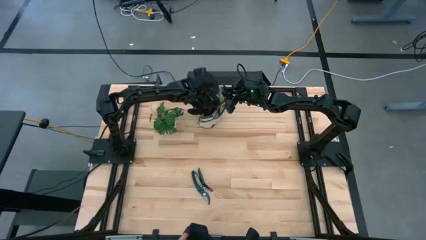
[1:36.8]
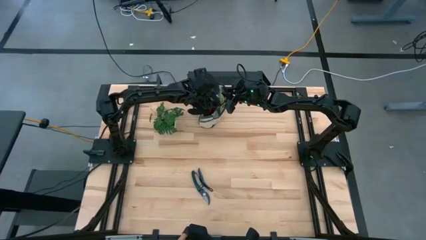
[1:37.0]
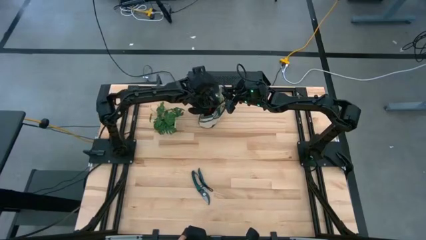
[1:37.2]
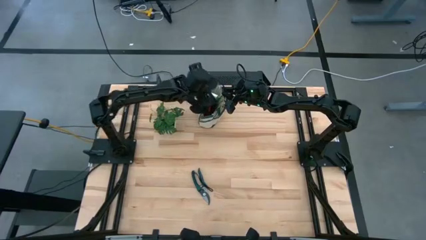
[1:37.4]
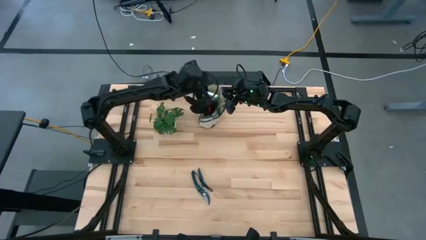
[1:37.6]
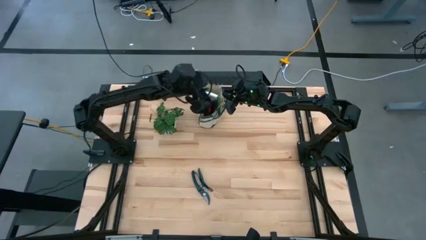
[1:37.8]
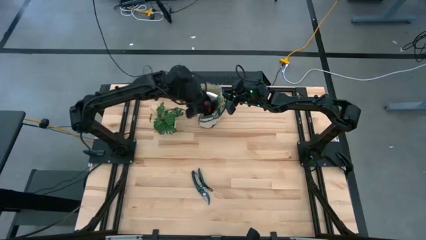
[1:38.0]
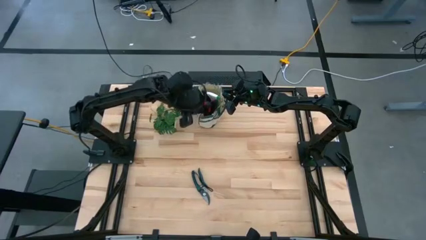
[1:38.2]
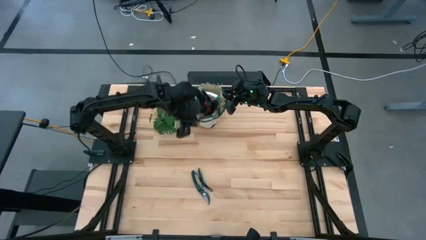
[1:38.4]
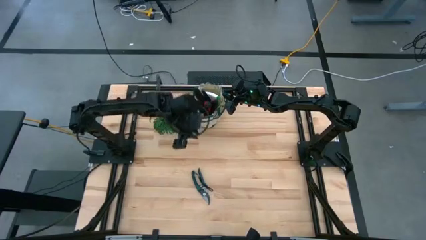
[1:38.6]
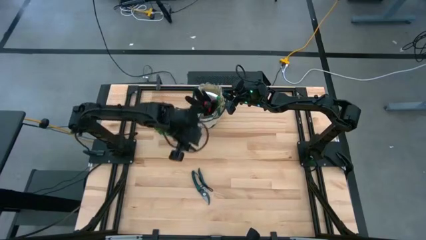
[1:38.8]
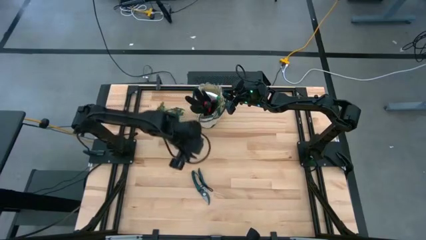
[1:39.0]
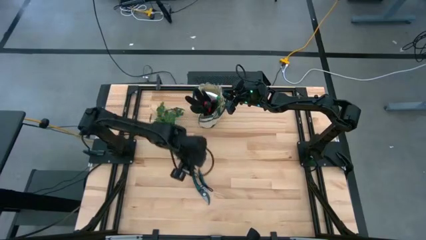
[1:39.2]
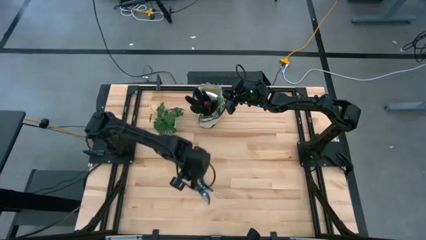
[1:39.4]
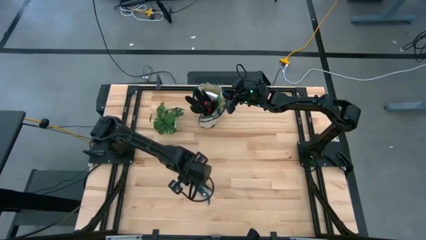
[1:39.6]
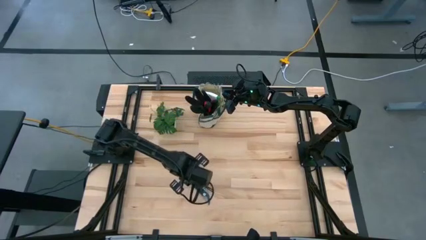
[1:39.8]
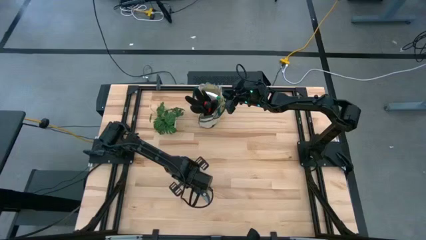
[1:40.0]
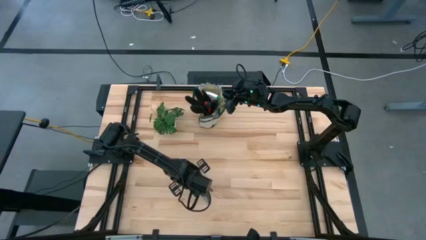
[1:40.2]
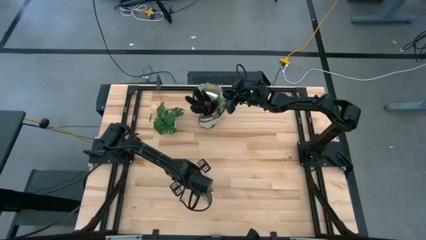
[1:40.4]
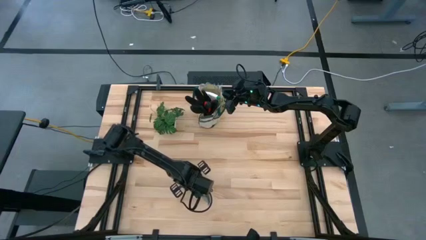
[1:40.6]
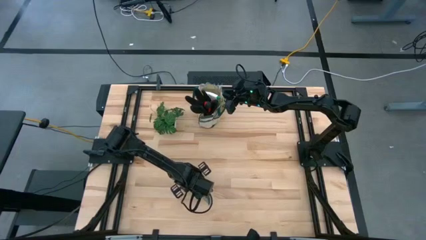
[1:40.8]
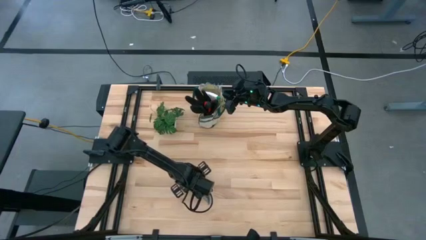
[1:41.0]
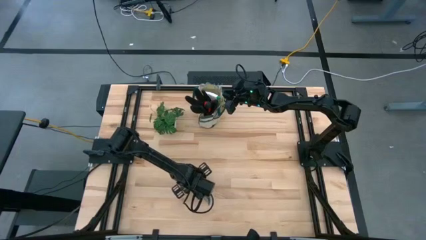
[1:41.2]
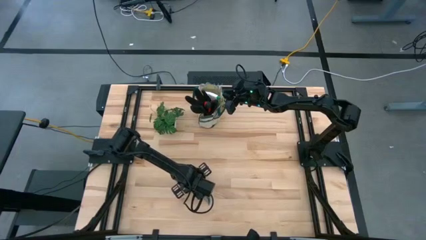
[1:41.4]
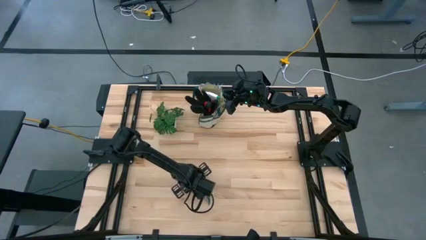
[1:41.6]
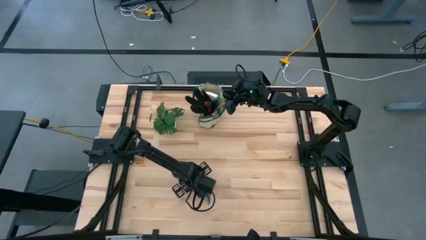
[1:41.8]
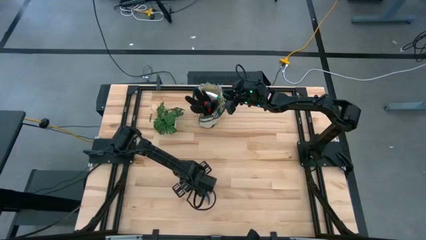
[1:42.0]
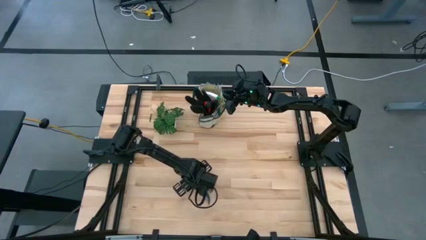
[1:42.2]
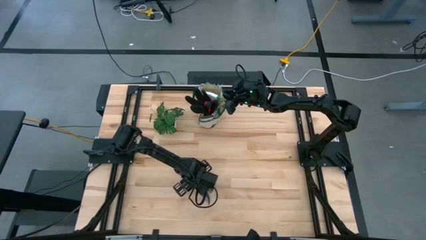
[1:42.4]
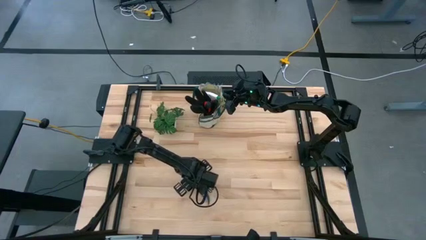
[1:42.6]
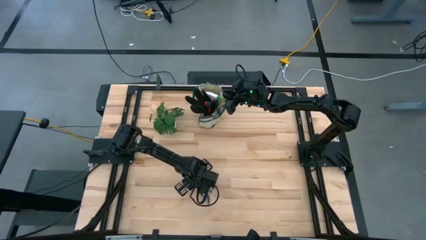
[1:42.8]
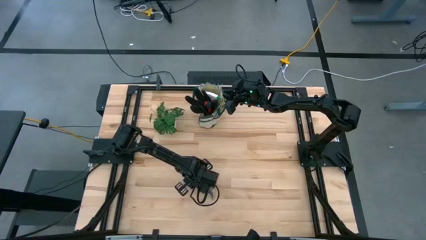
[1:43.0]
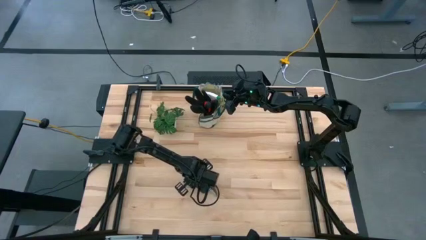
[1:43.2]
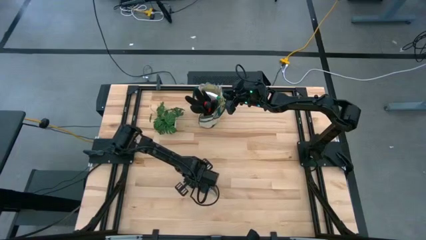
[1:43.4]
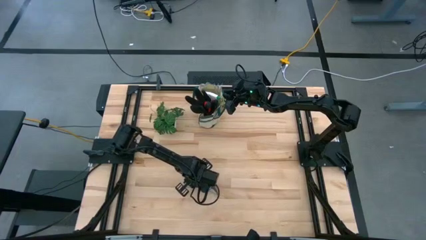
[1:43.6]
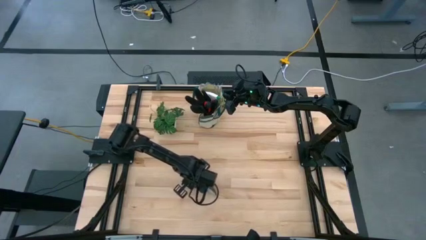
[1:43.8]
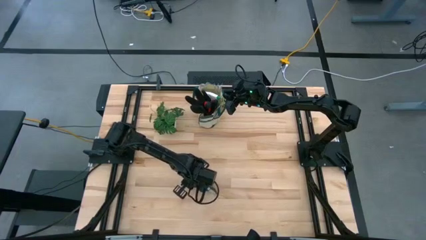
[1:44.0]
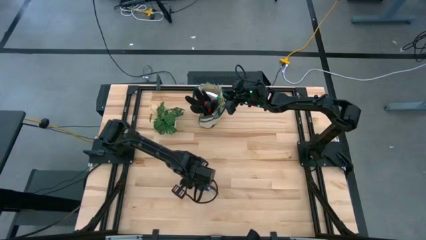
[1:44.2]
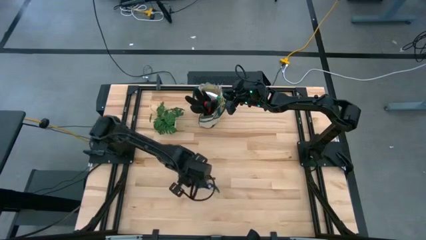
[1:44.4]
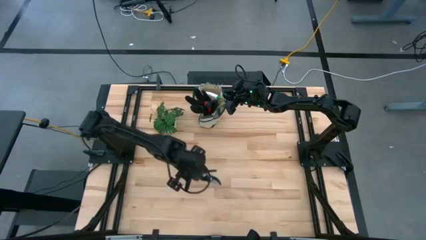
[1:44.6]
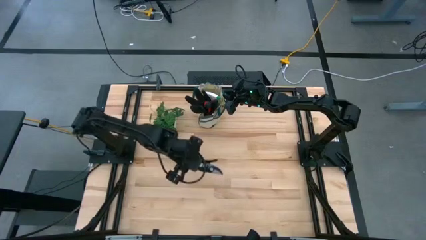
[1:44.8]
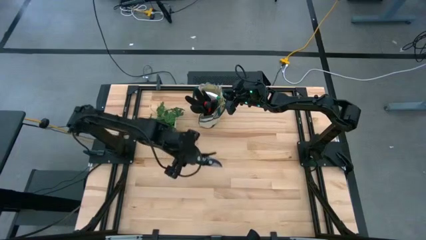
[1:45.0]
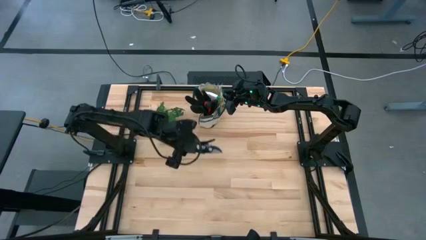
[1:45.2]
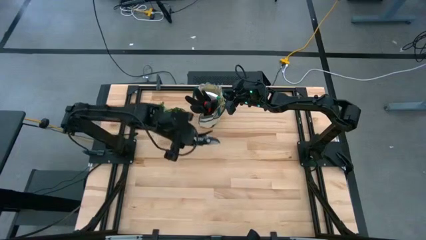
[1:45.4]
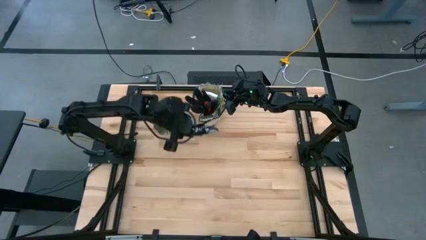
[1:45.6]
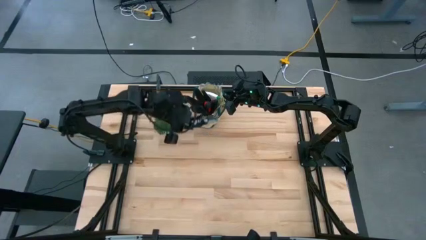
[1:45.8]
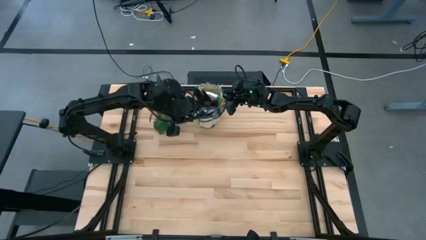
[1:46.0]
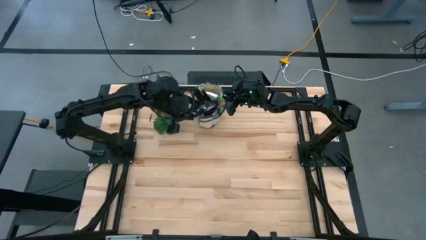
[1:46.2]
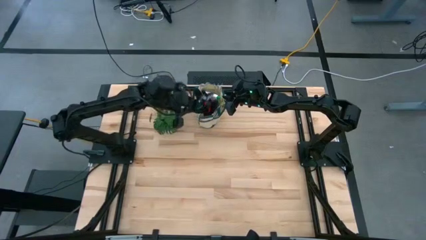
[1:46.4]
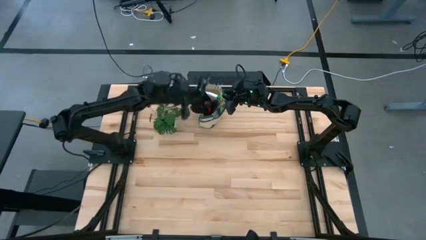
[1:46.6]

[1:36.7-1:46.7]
Task: Pick & Place Garden tools in Gardening bag
Put the green shear scissors into the white gardening bag
